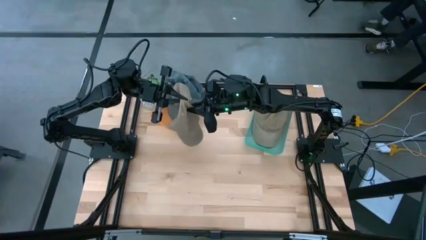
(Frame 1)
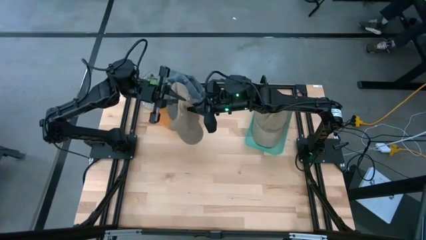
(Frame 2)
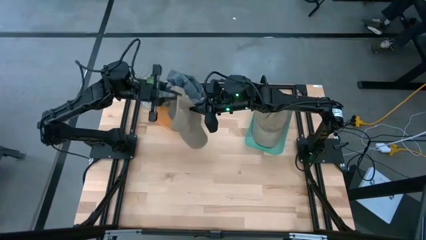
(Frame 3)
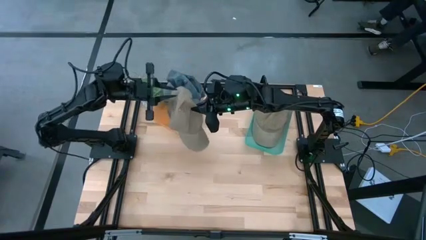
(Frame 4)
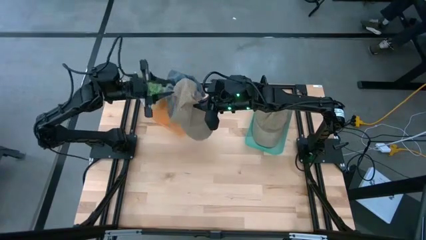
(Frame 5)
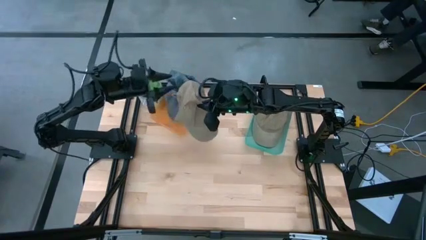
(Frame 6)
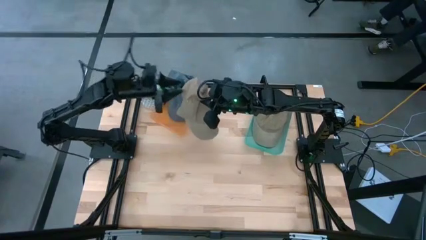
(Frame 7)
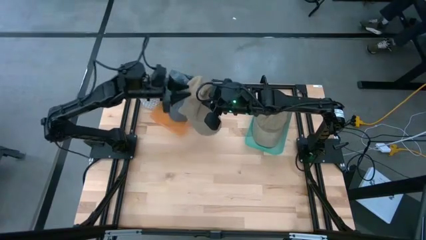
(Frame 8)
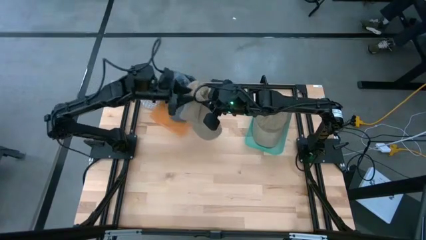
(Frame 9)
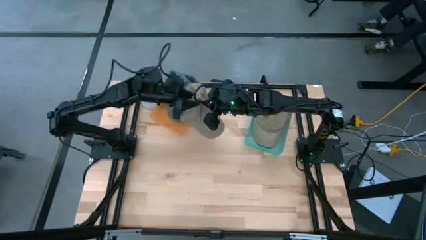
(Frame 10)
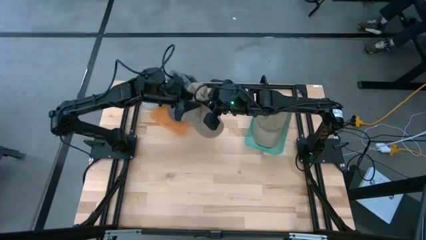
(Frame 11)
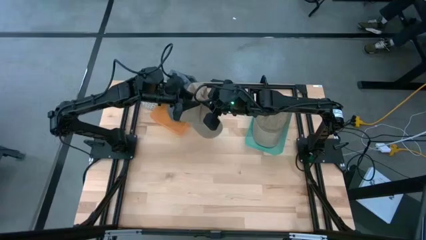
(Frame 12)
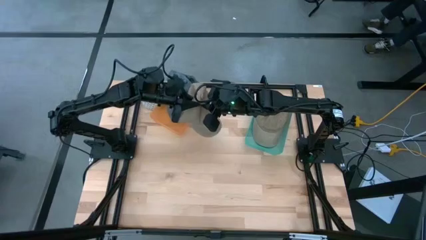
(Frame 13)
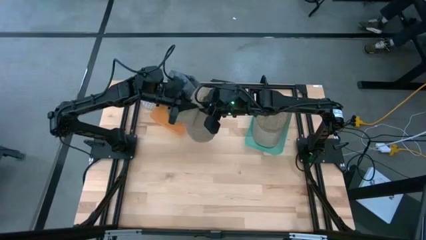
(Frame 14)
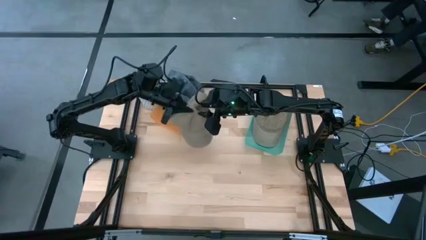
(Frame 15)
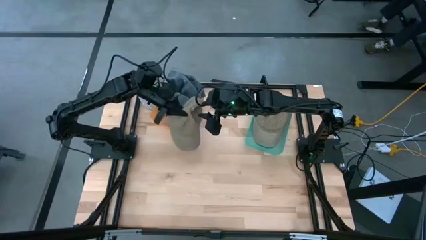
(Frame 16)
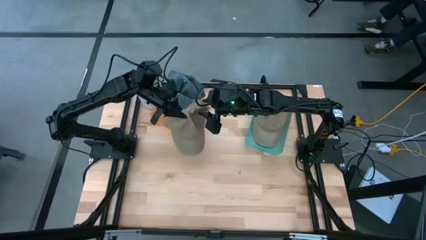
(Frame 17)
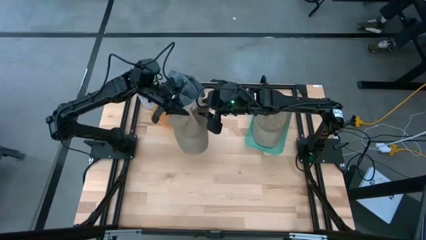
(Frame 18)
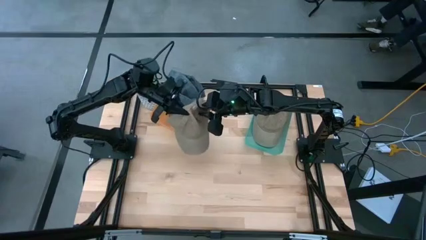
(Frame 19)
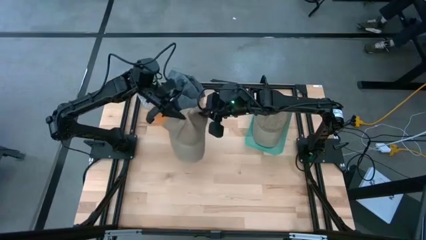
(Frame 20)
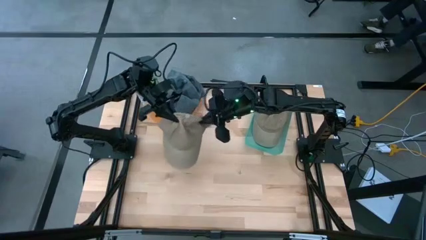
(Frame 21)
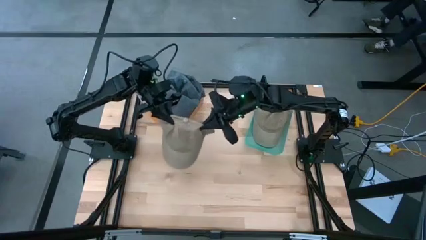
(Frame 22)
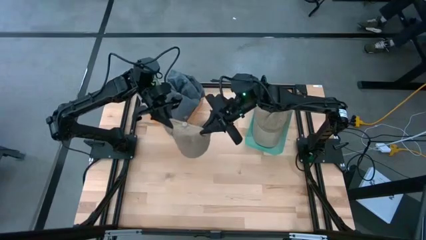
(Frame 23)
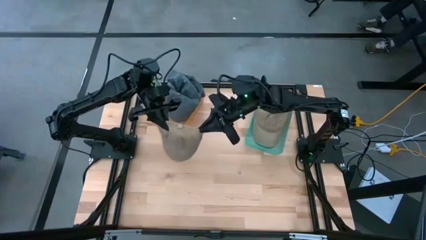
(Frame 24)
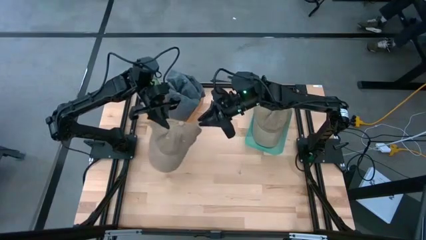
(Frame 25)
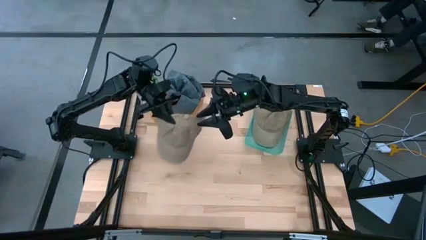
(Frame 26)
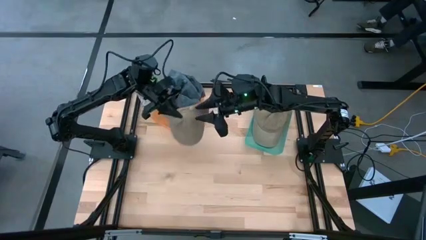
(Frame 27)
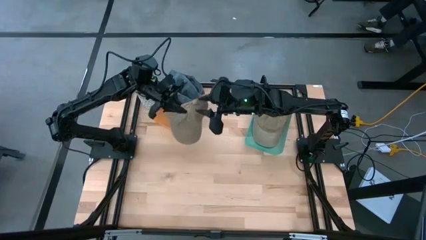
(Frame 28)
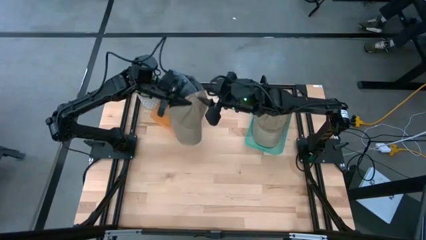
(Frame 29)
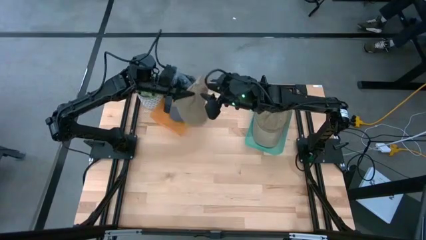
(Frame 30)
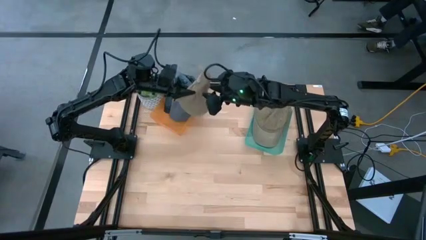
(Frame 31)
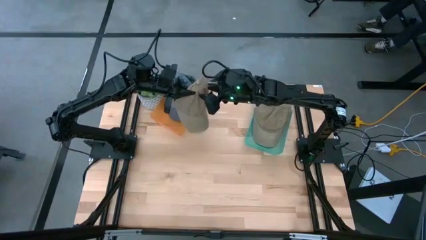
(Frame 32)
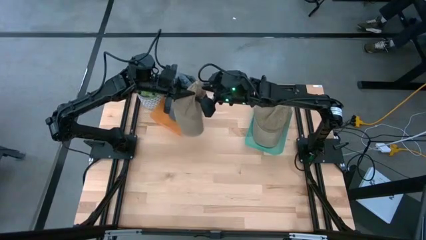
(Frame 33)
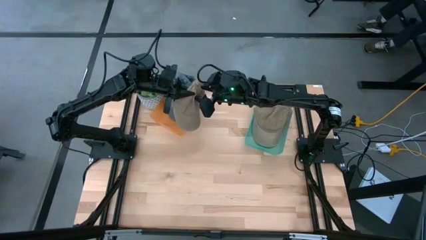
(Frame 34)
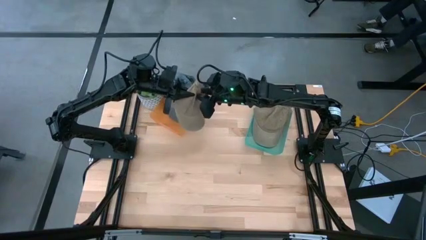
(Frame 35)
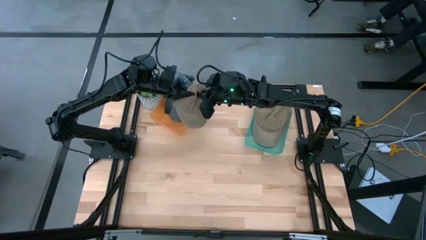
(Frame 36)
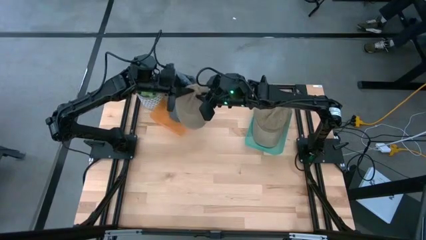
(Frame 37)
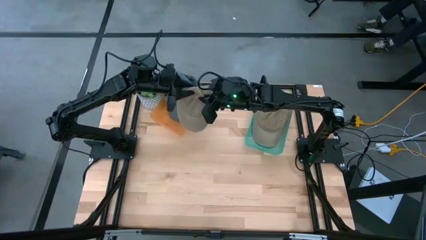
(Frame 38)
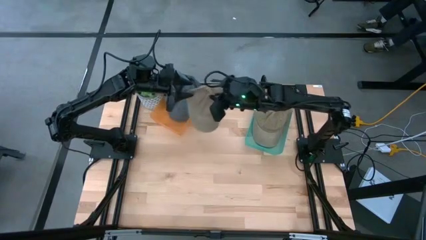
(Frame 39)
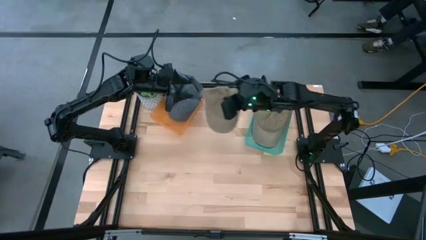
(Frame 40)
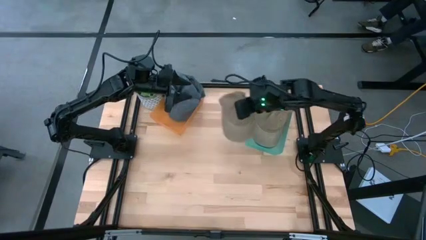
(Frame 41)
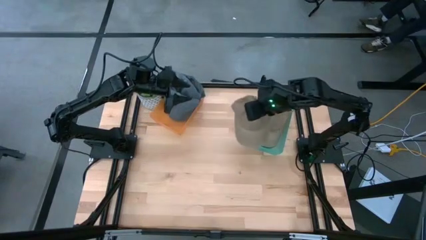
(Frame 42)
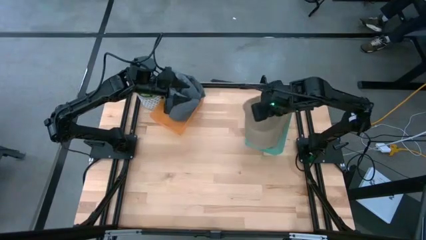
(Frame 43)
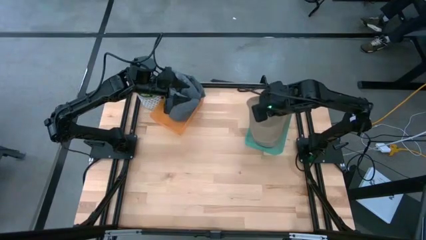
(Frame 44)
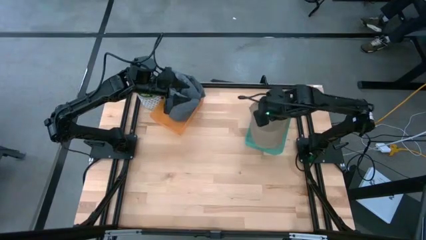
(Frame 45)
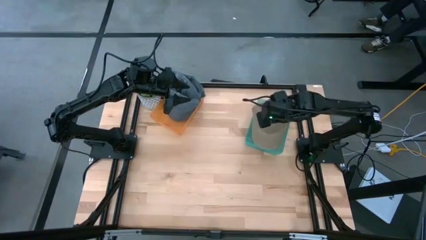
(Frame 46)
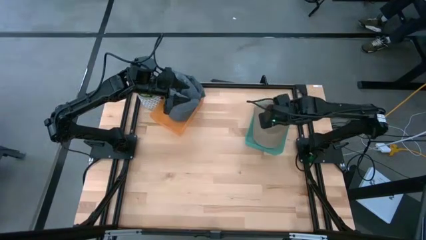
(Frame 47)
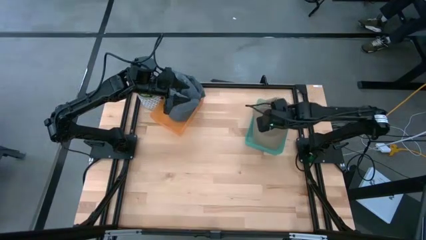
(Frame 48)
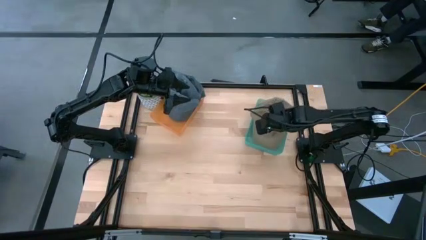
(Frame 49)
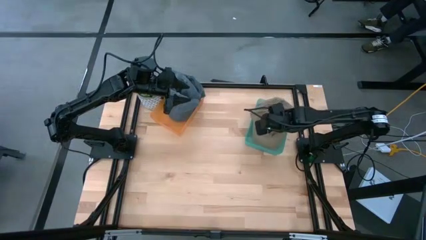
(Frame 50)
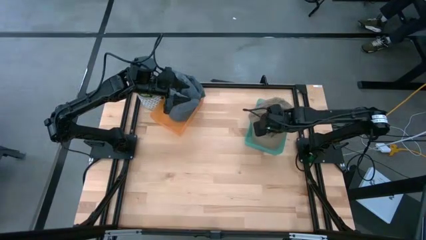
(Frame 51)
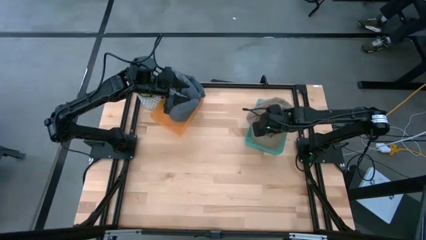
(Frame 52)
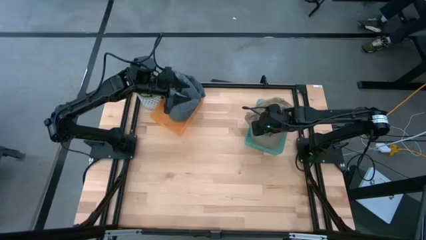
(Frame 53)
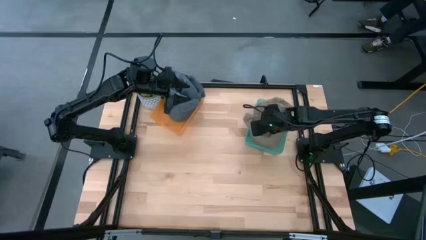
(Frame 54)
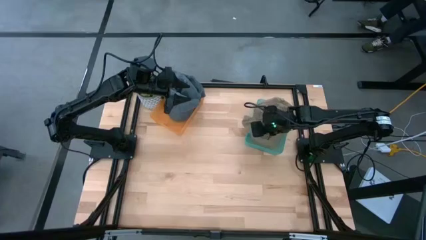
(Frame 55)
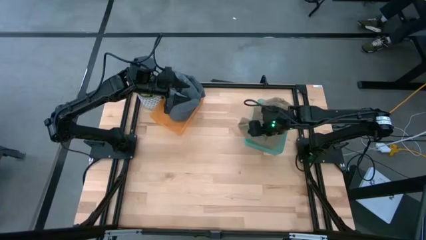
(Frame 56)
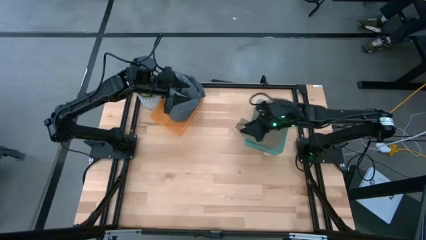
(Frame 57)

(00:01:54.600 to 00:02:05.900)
Task: Pick & Place hat
Put the brown cap into the blue bin

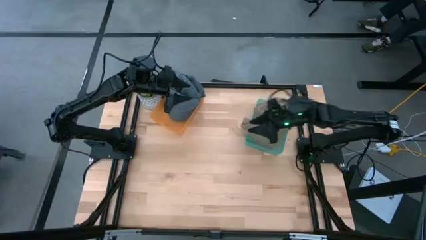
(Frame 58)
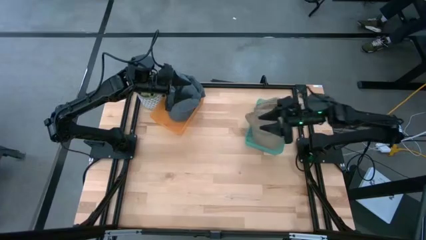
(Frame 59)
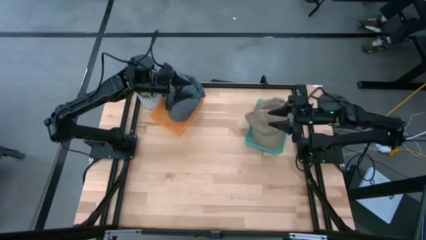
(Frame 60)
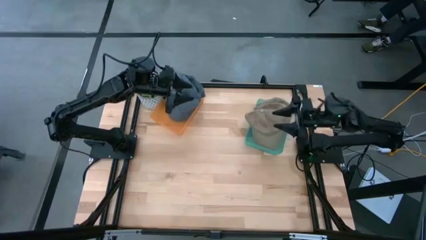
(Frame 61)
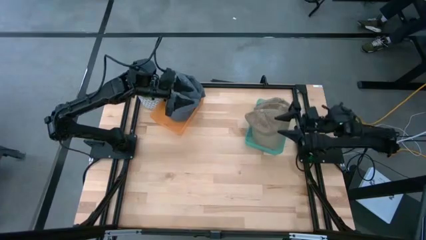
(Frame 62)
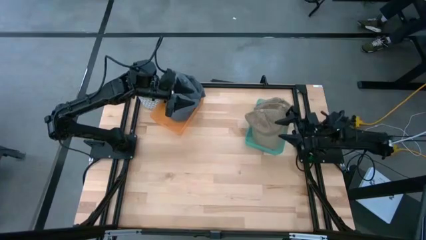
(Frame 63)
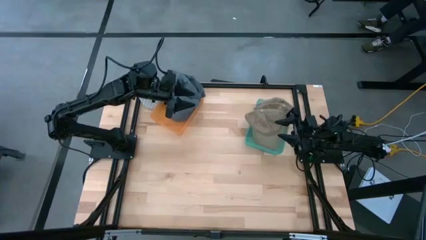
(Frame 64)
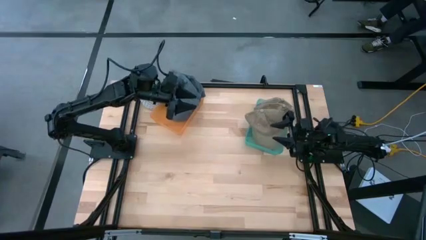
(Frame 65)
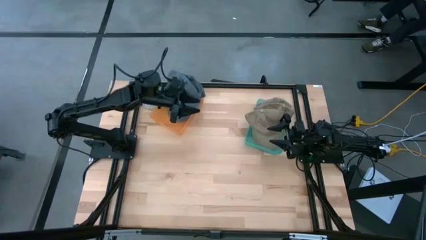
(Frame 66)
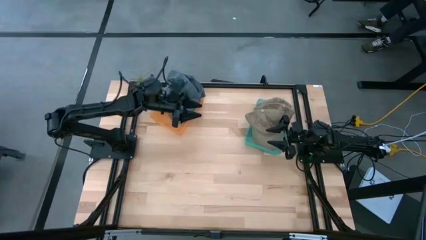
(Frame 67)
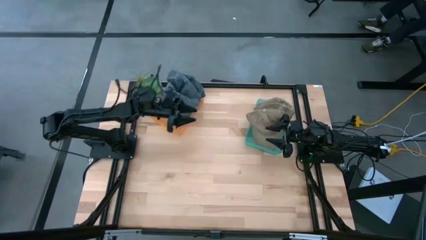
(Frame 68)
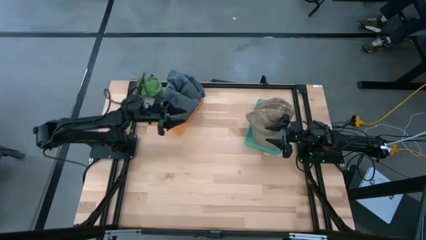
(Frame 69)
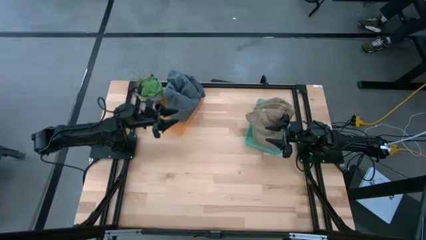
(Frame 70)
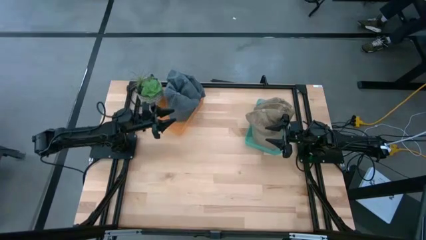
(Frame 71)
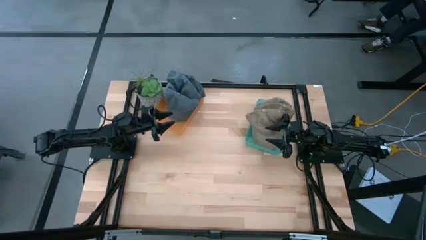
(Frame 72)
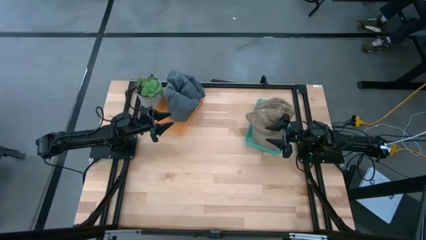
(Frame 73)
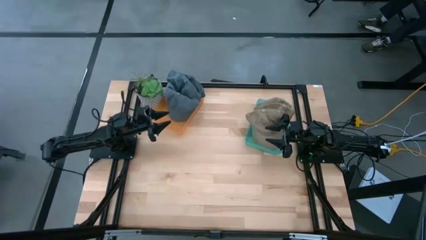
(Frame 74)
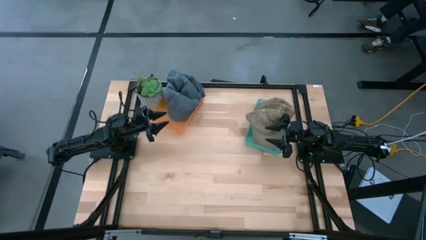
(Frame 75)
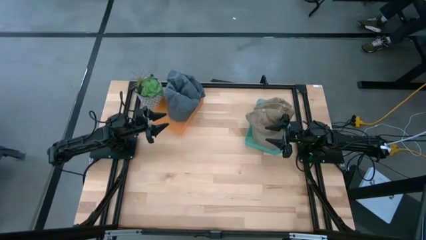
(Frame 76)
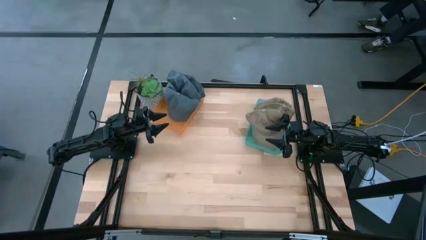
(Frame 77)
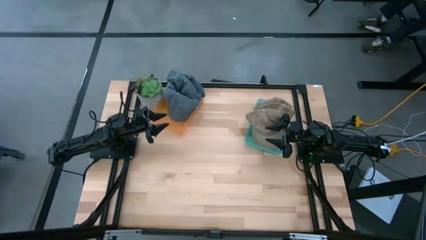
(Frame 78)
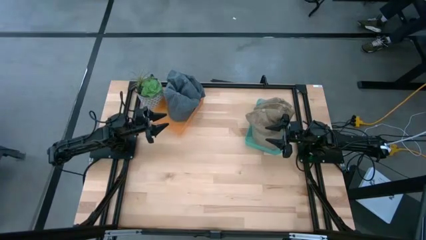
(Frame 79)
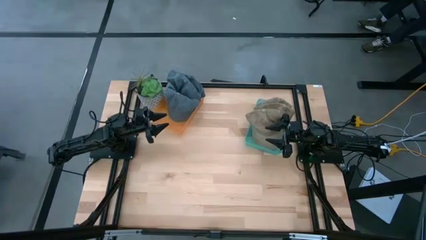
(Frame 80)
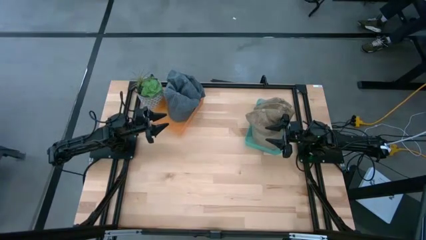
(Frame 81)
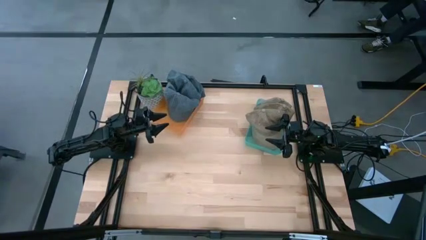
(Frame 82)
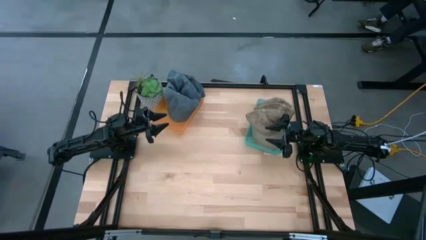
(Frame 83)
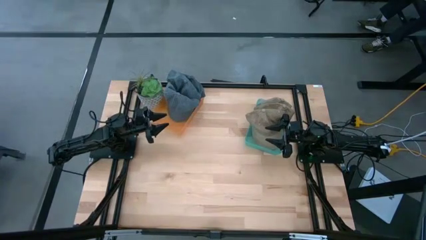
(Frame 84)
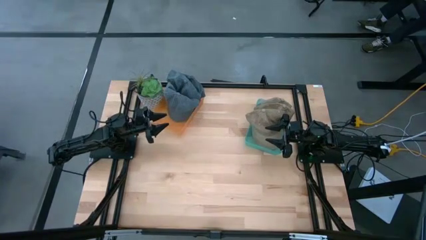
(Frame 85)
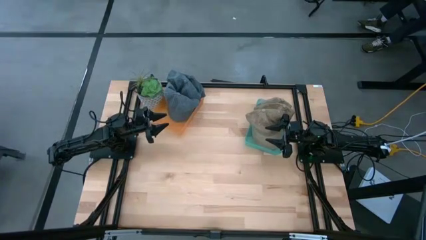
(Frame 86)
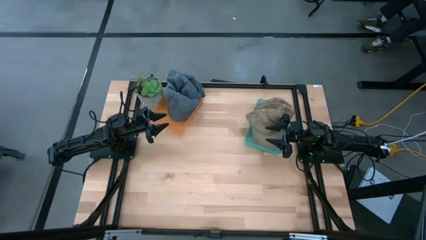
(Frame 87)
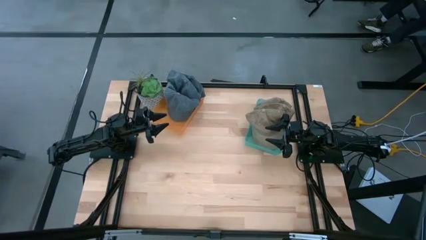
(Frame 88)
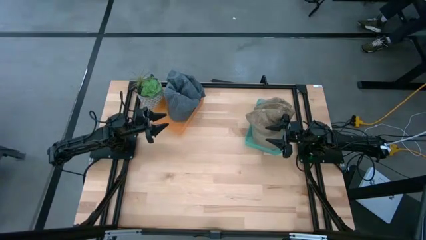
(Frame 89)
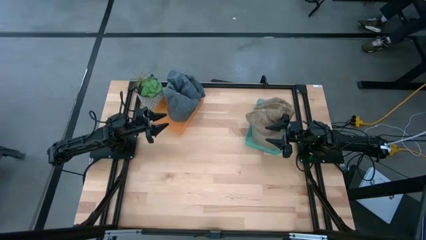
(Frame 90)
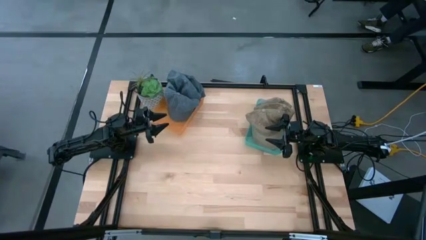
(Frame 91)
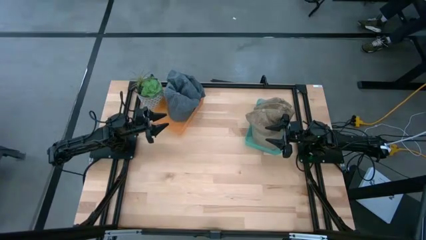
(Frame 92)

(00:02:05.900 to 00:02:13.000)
Return to Home Position
